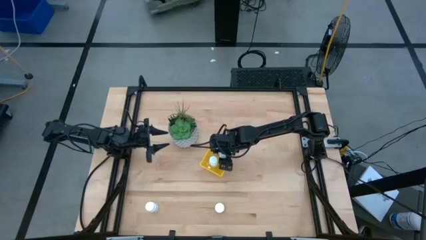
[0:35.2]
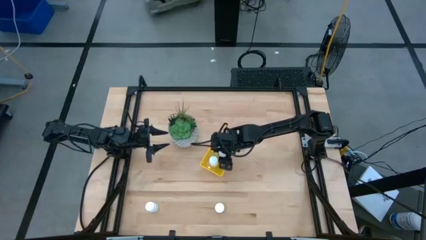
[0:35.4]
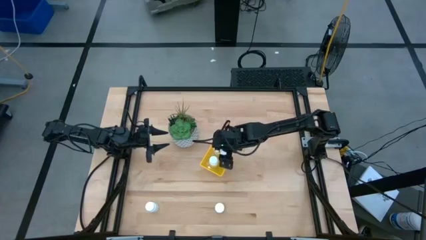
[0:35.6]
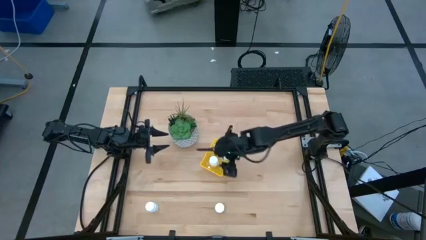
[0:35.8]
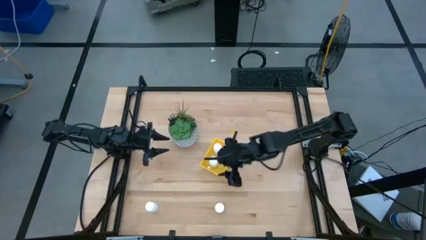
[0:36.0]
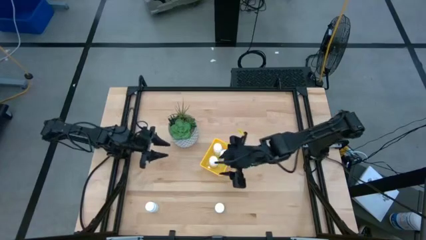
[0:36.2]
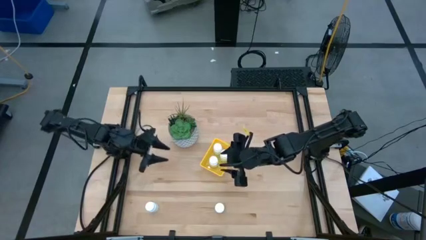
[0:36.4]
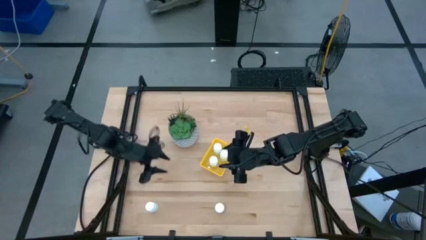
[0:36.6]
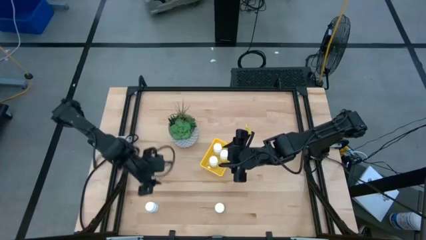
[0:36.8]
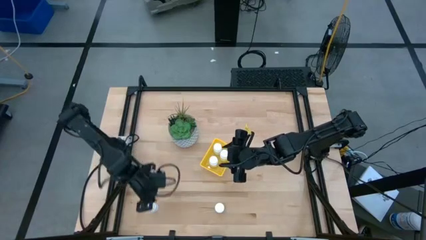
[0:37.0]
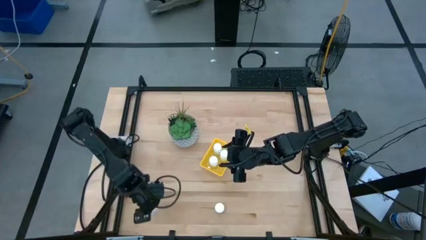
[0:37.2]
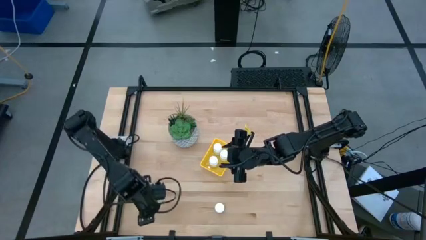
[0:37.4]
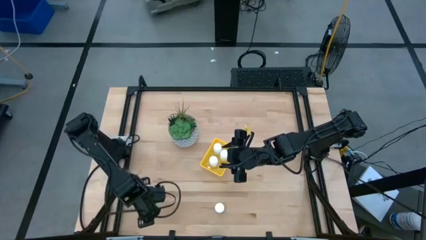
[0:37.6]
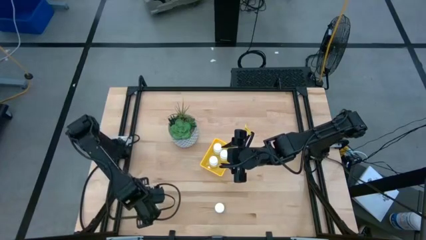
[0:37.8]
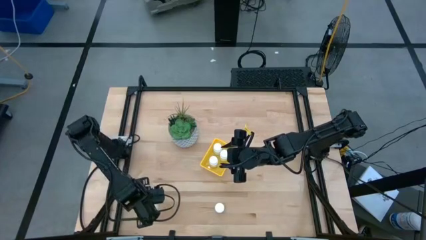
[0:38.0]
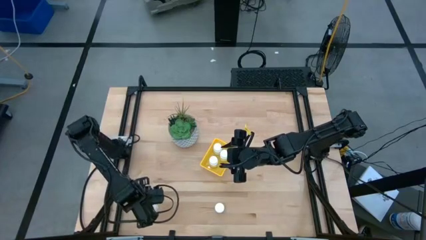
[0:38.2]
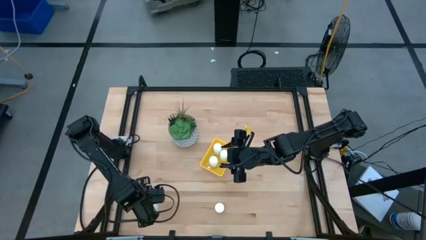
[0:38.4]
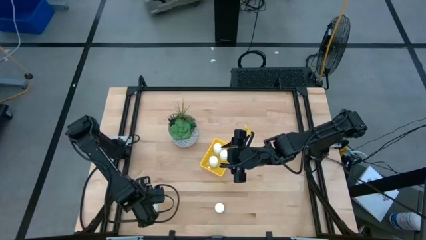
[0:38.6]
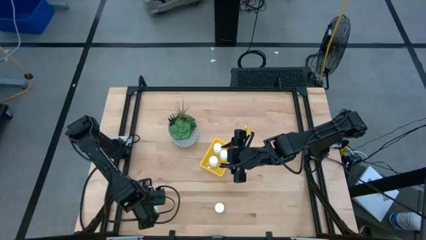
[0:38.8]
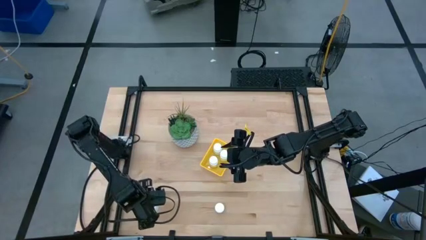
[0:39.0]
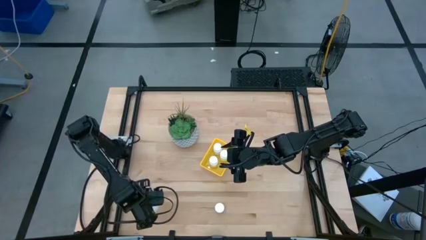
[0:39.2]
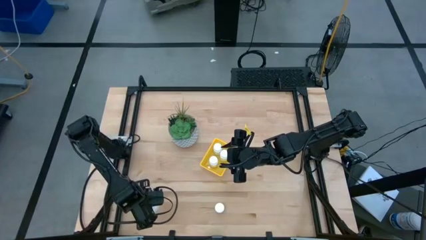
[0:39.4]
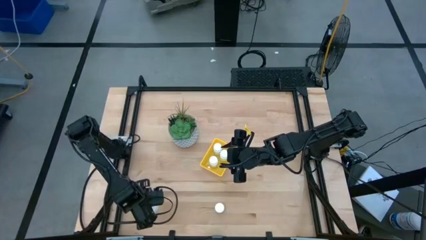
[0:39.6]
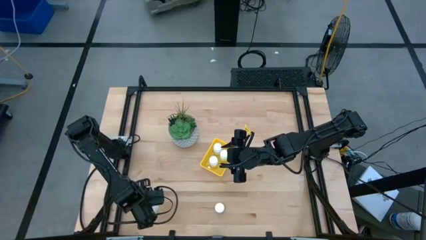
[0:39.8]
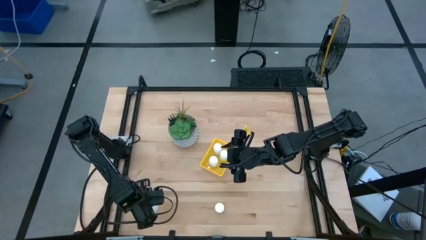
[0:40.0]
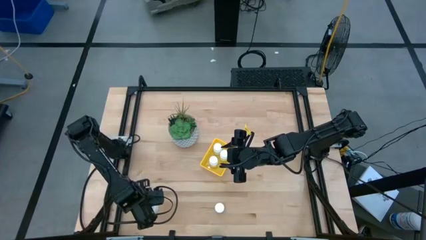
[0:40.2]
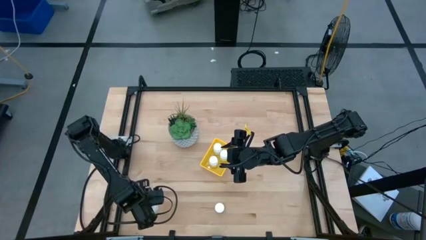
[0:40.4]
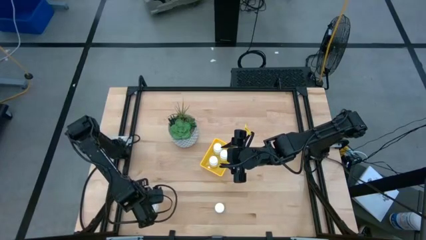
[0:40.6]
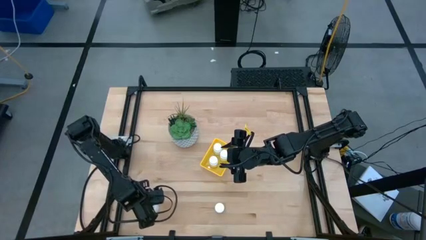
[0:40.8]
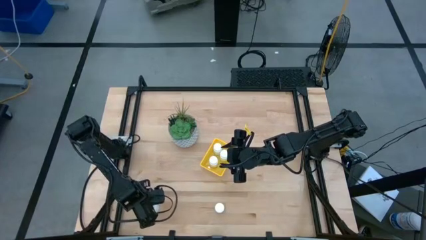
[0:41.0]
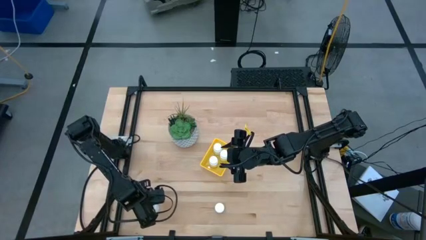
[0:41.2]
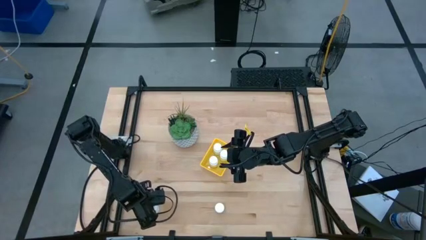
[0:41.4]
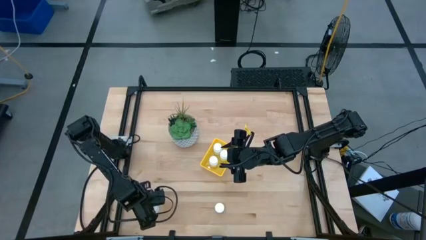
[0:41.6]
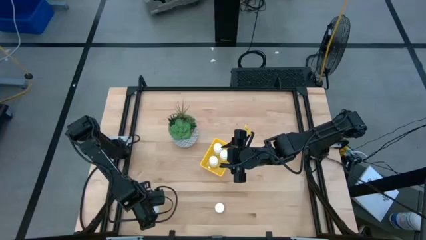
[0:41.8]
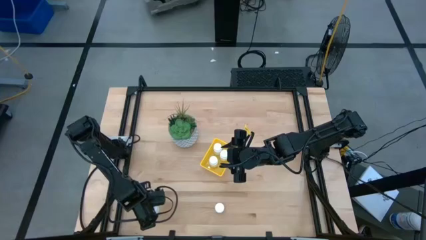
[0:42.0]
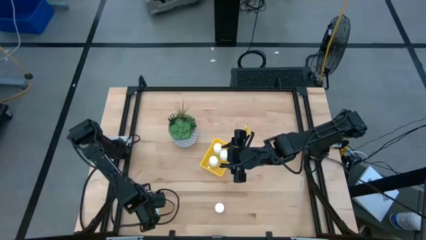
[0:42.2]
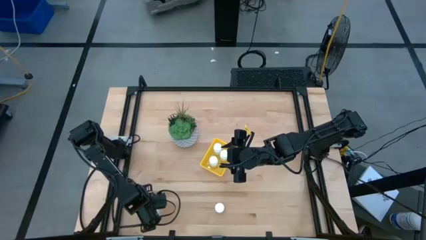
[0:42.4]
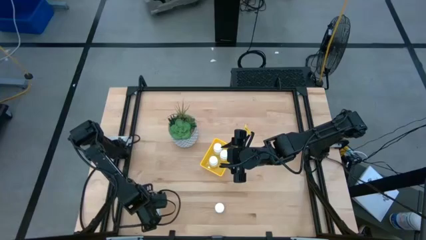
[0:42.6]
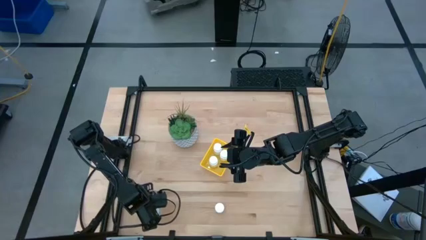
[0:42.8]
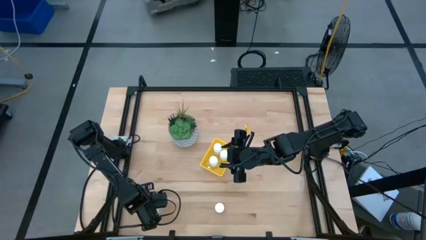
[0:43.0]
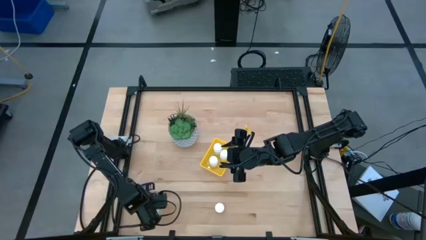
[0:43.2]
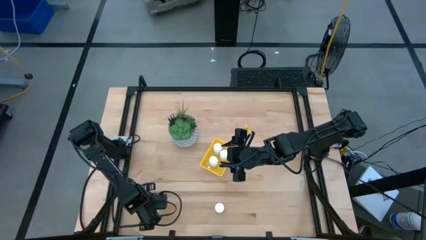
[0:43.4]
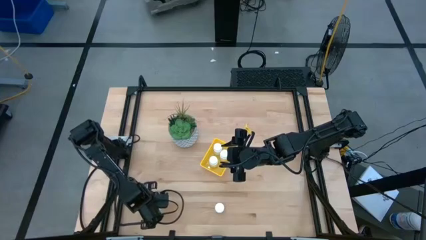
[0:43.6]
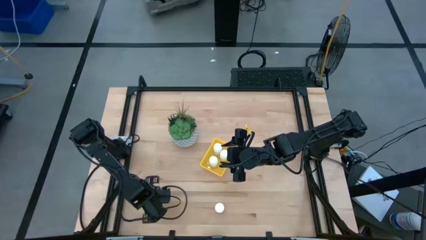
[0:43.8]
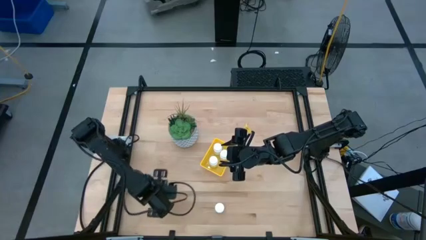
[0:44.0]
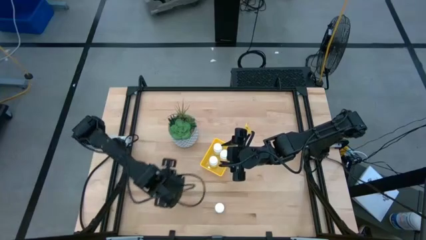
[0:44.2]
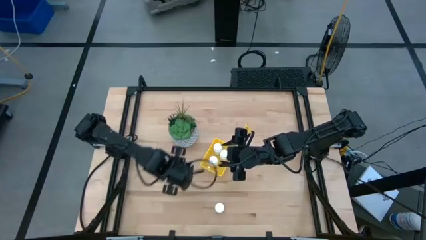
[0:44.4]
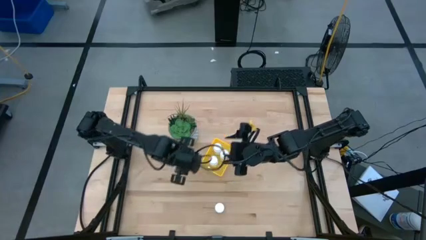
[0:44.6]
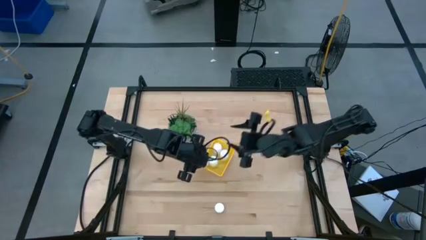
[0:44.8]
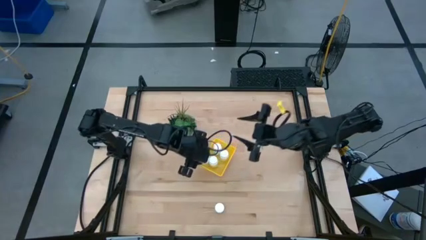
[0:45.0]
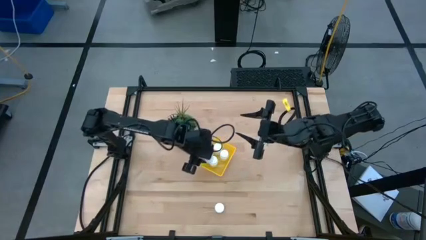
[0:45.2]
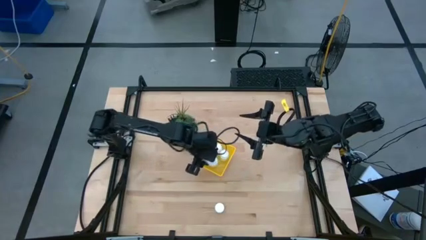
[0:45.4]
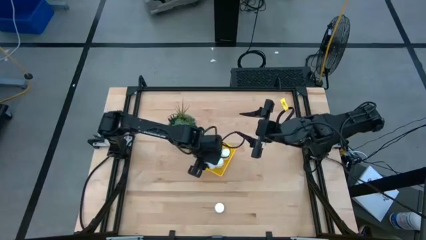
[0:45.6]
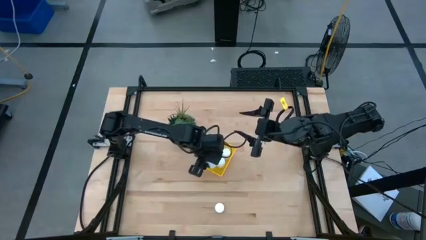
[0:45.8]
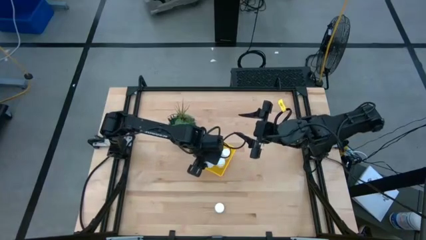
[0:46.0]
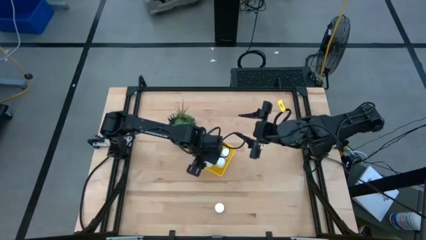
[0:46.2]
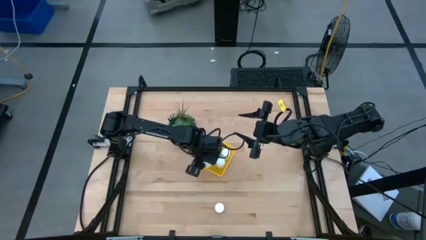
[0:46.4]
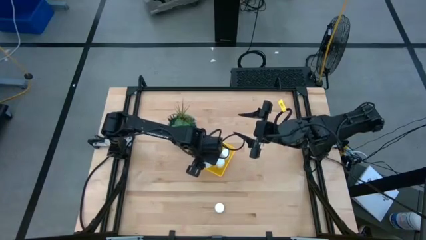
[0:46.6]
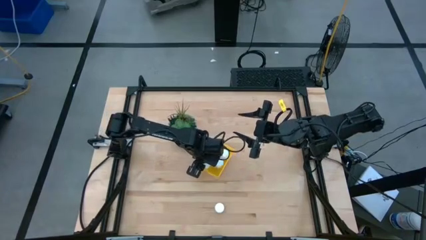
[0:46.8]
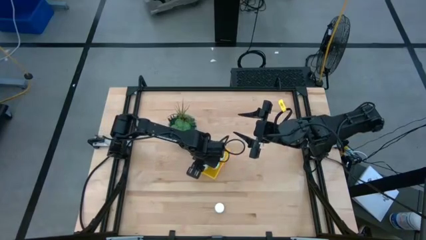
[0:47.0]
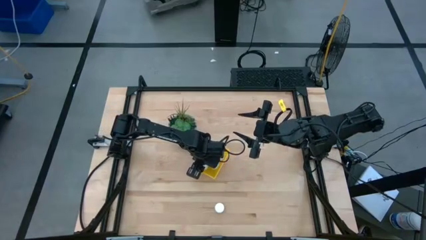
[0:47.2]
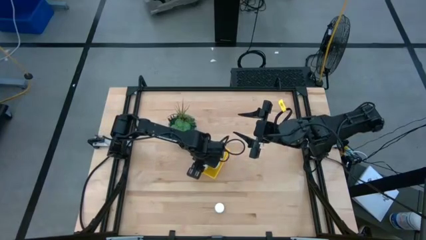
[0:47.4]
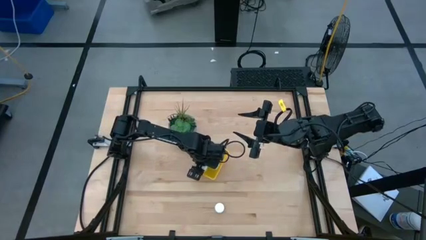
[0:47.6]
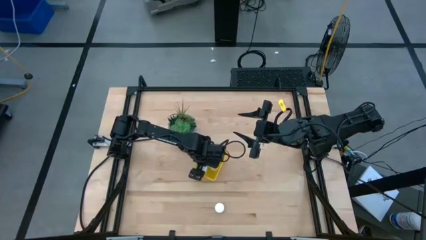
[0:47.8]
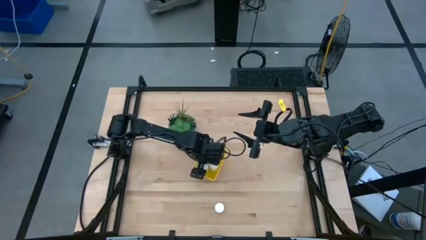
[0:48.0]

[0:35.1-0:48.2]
Task: Pick and place pill bottles into a basket
Put the white pill bottle into the yellow basket
